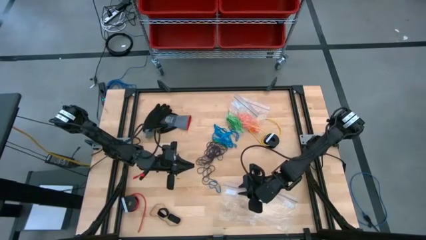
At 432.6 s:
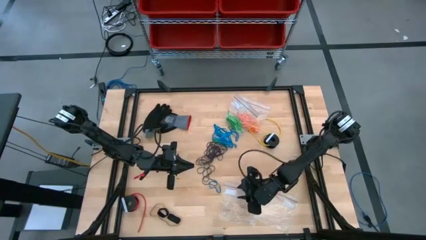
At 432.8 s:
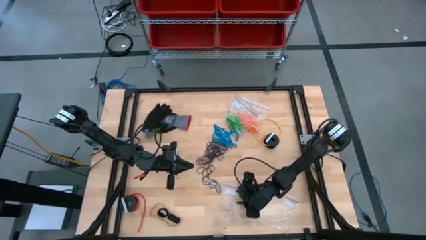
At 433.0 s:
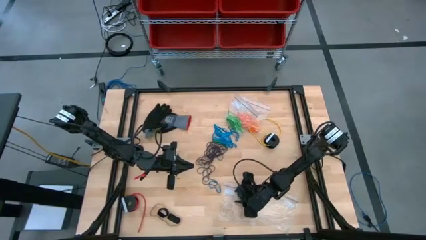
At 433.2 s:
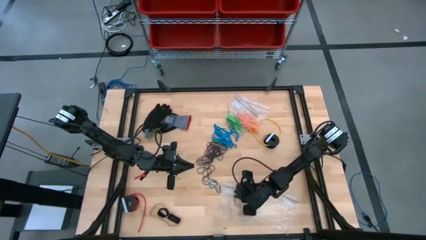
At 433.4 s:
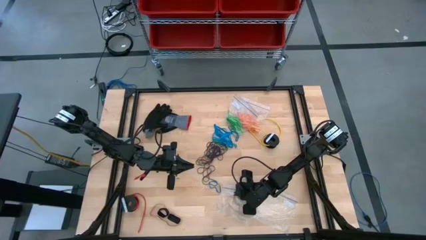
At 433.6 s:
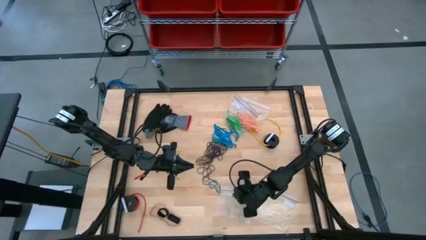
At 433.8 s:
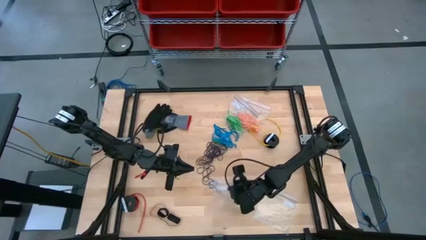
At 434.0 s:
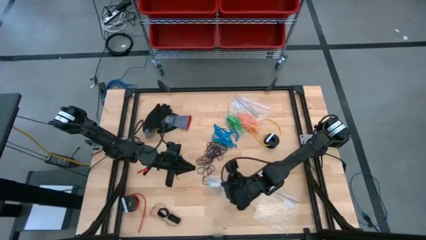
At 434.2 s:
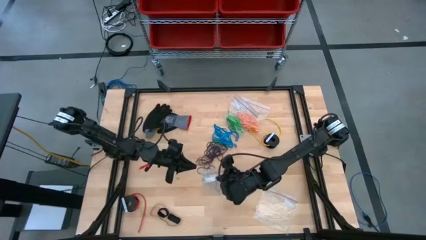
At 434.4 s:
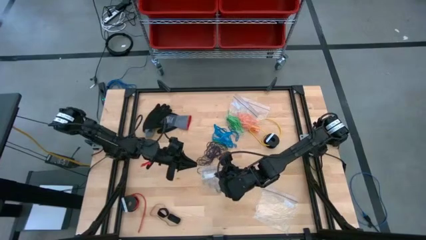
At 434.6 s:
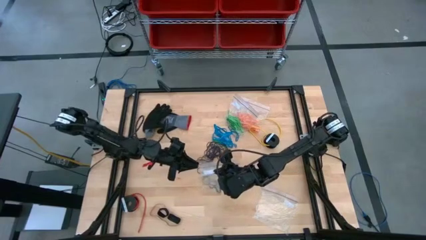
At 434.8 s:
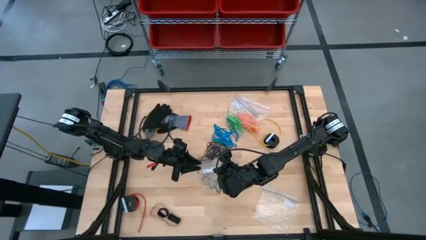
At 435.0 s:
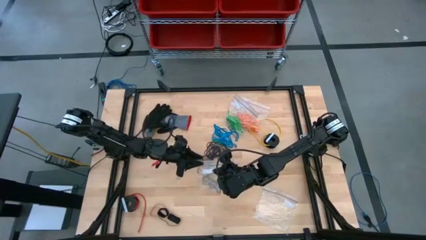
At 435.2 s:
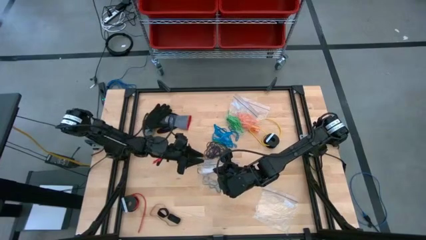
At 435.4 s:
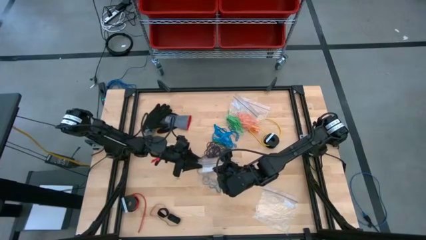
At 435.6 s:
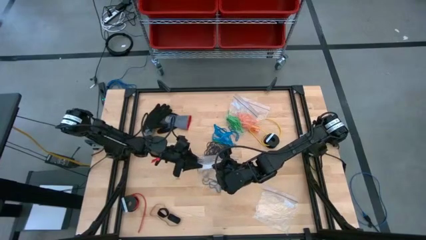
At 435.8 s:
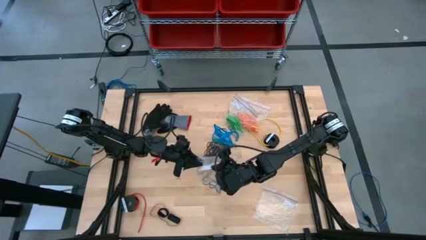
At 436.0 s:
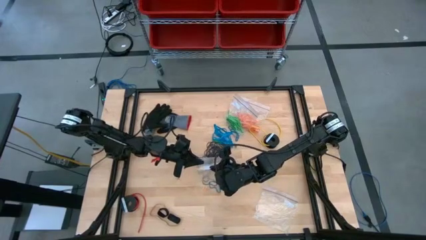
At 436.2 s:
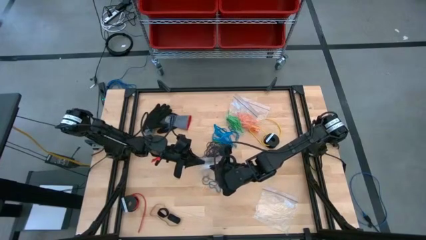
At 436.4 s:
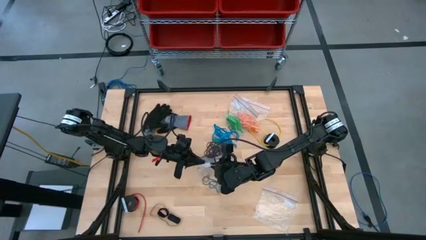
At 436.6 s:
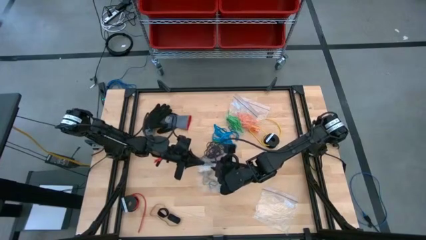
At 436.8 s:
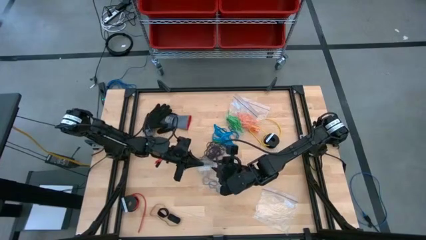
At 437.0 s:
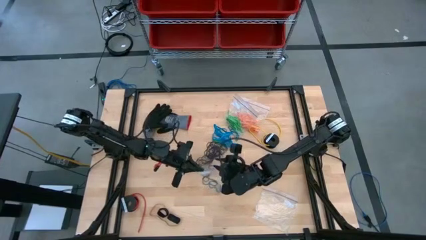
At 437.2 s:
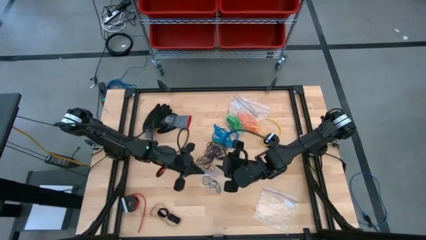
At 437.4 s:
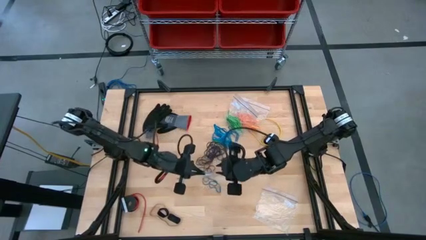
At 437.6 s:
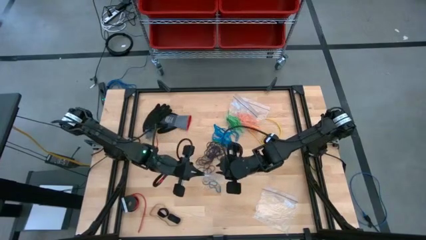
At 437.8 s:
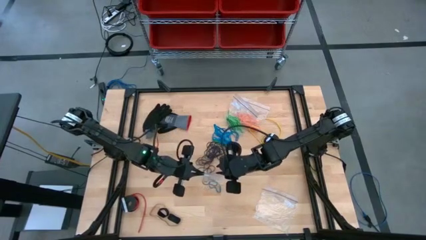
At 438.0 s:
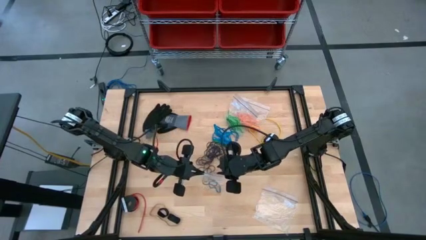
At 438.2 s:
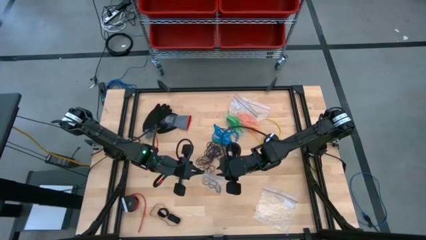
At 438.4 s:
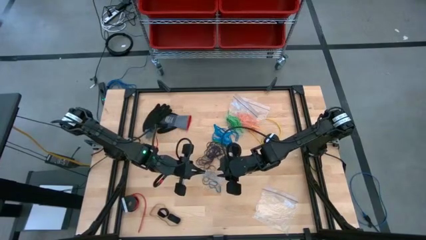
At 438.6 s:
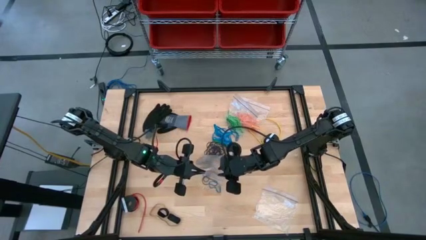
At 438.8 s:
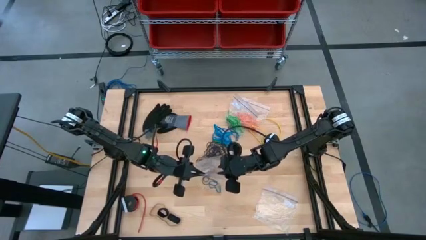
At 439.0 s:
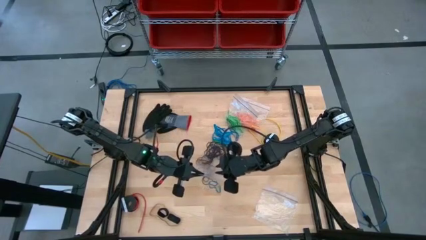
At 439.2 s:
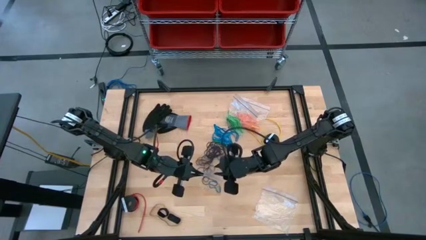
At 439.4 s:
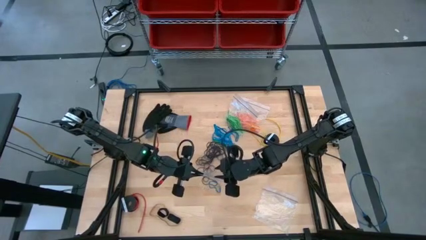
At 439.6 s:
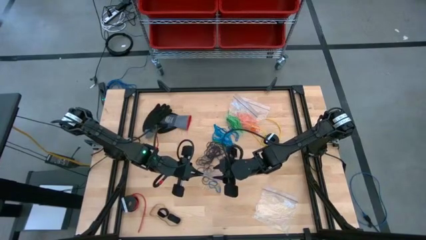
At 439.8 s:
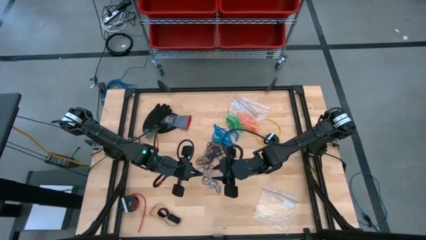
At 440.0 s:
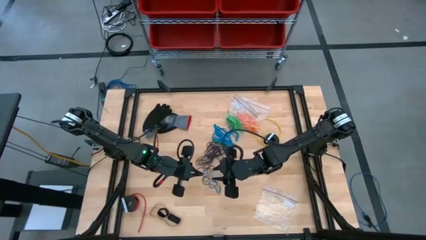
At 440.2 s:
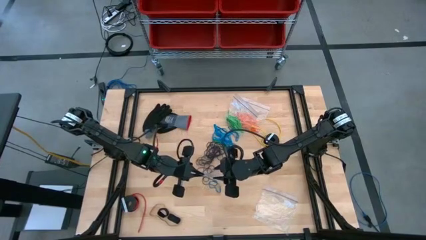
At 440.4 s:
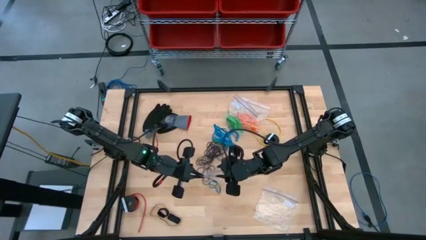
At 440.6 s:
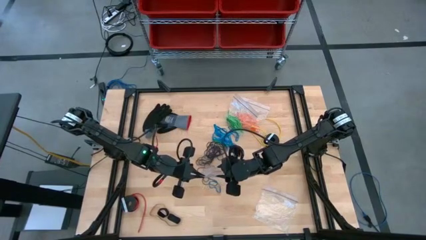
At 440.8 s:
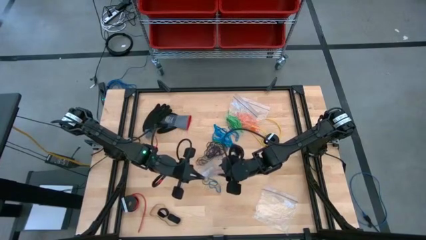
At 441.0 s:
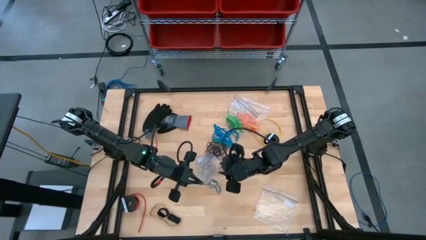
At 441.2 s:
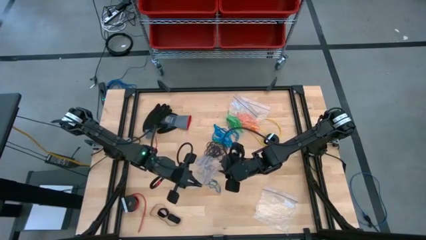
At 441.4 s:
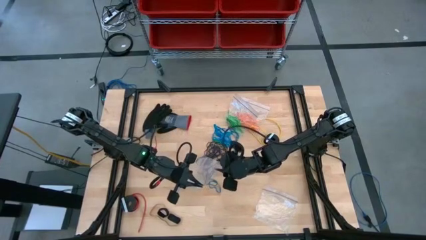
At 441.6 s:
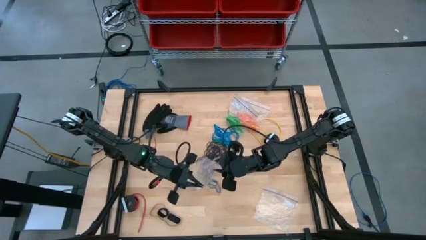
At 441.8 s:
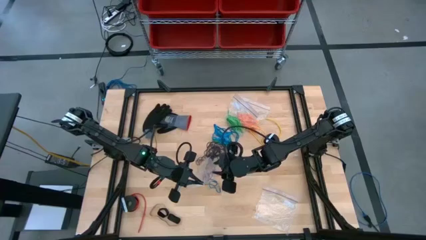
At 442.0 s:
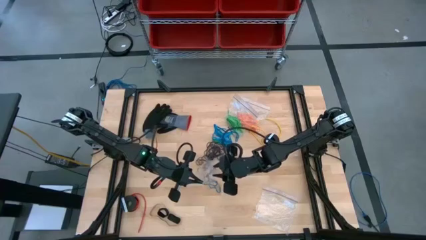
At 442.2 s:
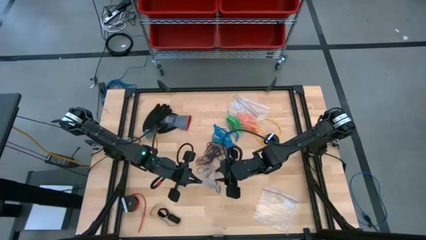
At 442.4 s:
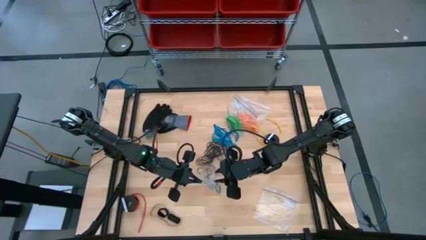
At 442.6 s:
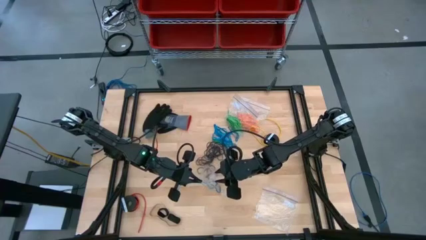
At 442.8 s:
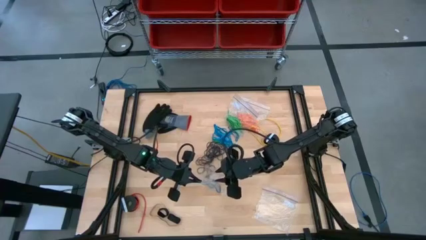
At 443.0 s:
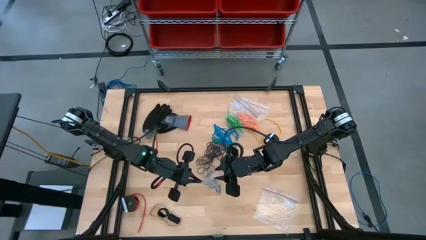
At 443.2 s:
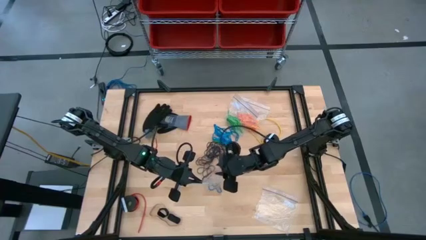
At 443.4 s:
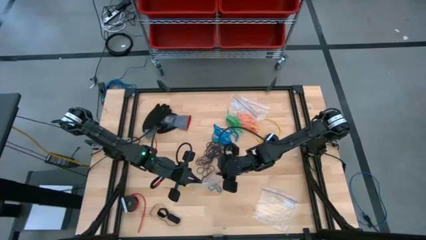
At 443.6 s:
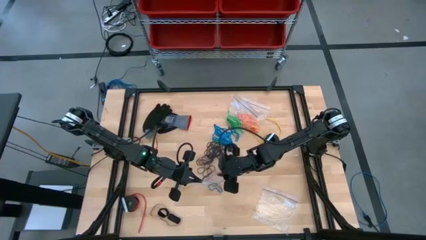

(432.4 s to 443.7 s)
Task: Sort rubber bands
Open the transparent zip bag

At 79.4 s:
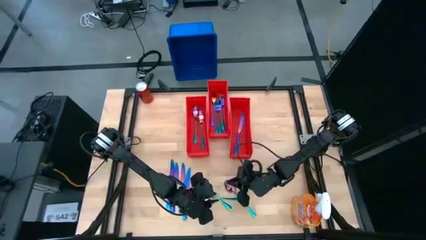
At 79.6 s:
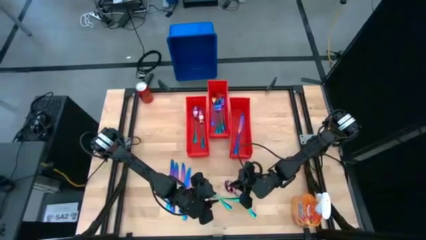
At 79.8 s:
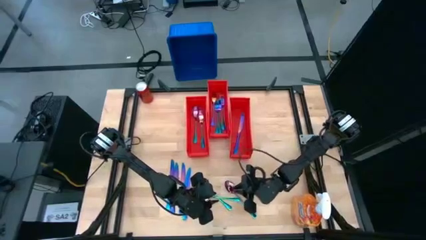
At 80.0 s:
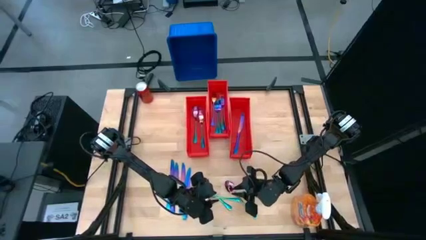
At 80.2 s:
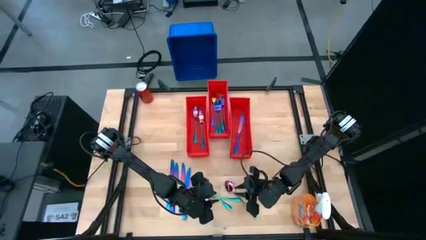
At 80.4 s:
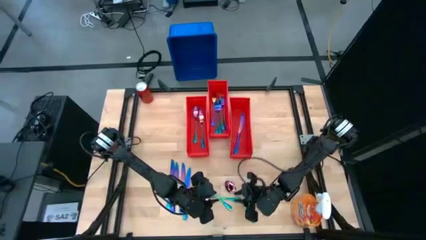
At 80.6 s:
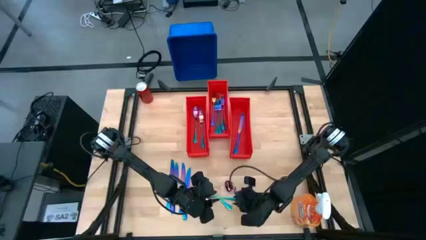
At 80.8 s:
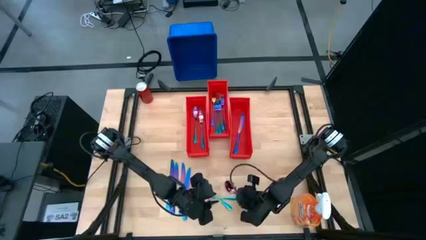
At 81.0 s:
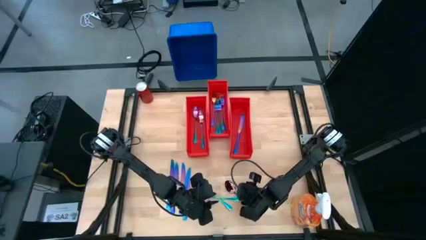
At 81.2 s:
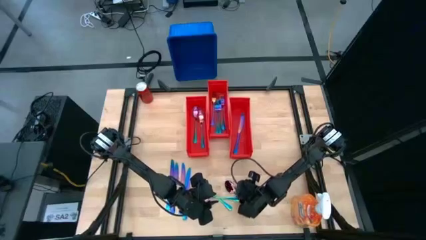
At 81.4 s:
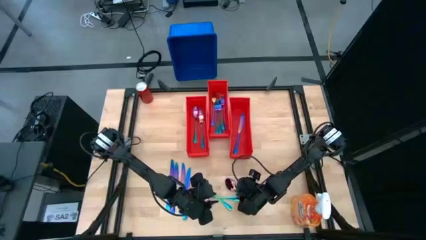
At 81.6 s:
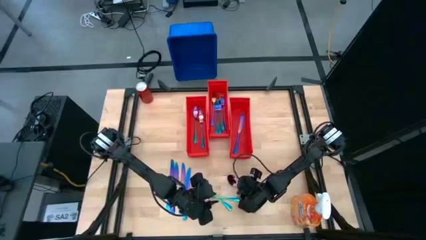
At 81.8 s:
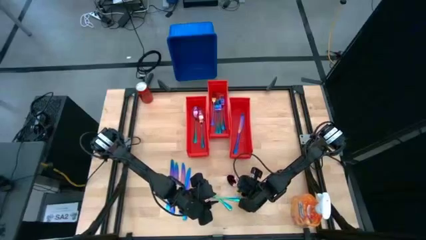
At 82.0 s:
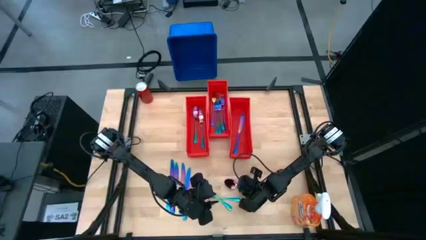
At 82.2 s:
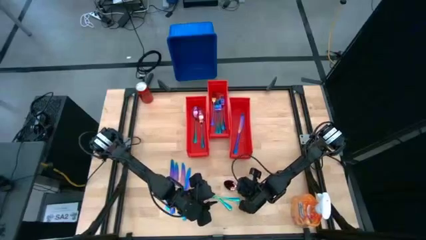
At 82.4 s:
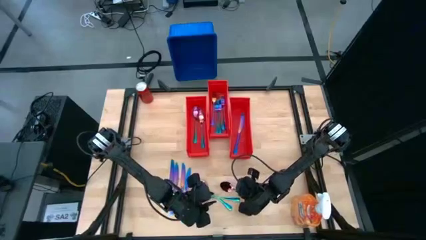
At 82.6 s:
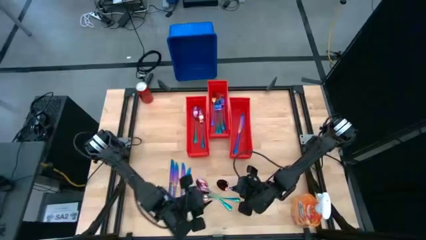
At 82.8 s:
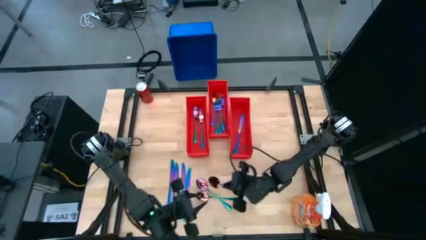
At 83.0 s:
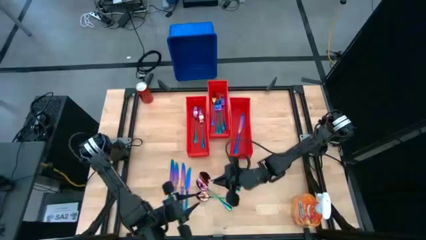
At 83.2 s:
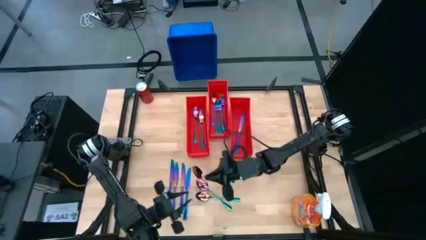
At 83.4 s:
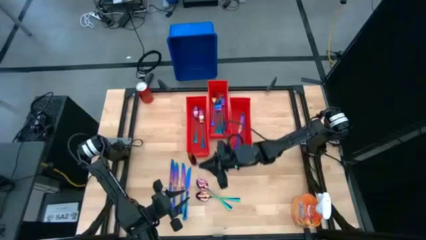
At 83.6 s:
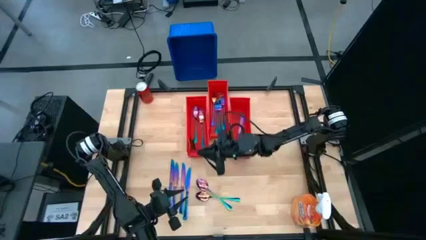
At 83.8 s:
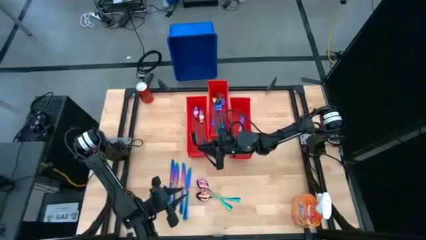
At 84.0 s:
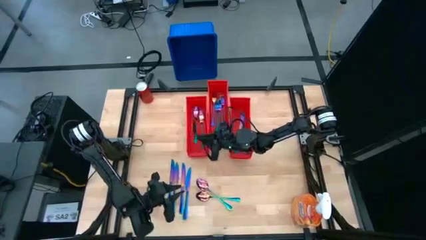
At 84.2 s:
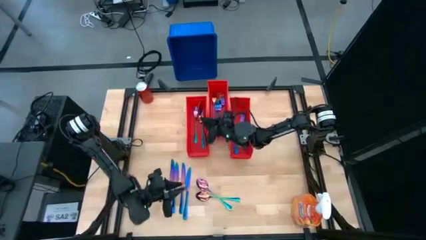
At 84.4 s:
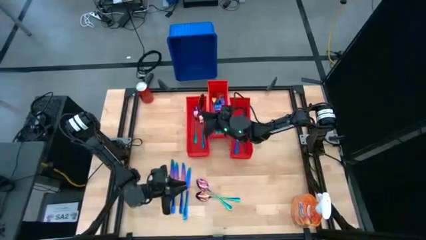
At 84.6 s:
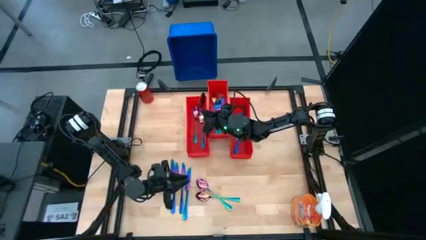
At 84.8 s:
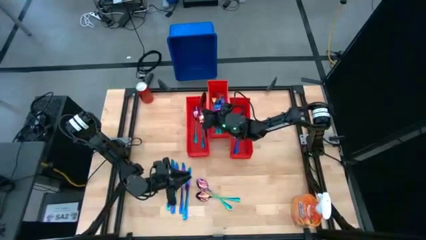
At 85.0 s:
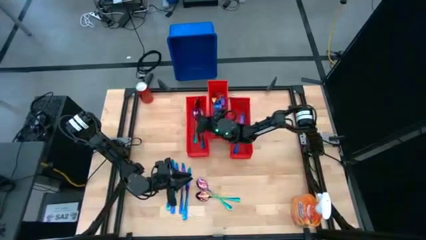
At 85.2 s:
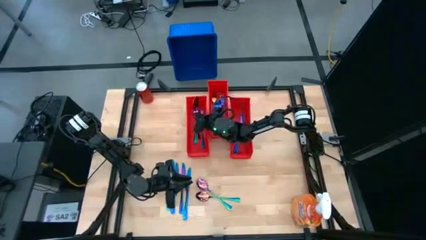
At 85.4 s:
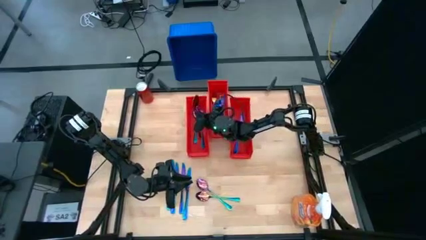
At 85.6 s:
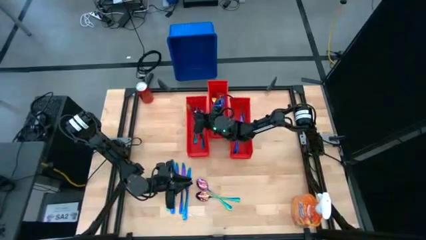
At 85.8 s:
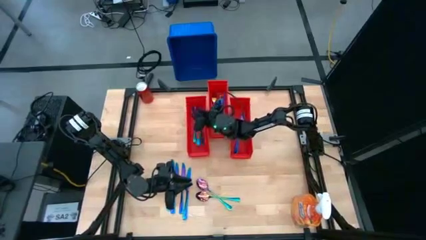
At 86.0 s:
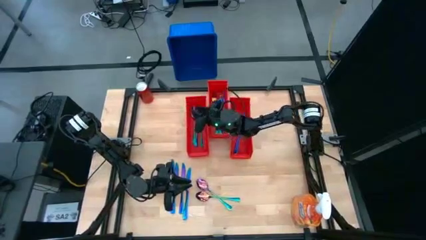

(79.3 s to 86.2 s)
Task: Sort silverware
Put the iridescent spoon into the left orange bin
